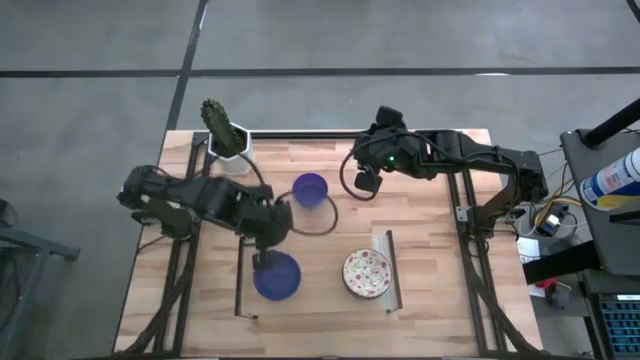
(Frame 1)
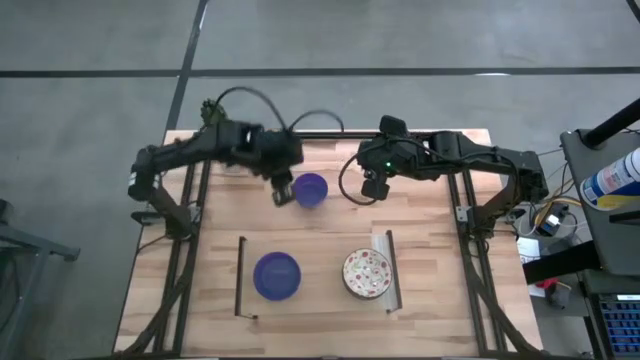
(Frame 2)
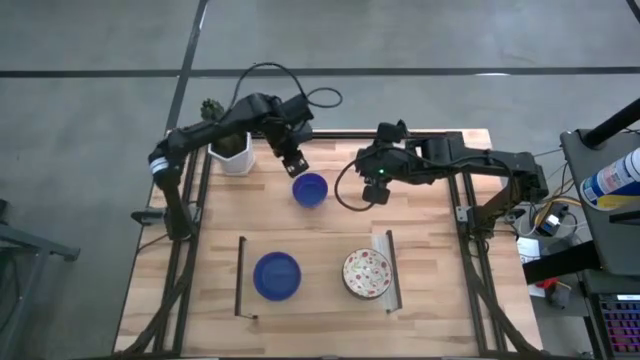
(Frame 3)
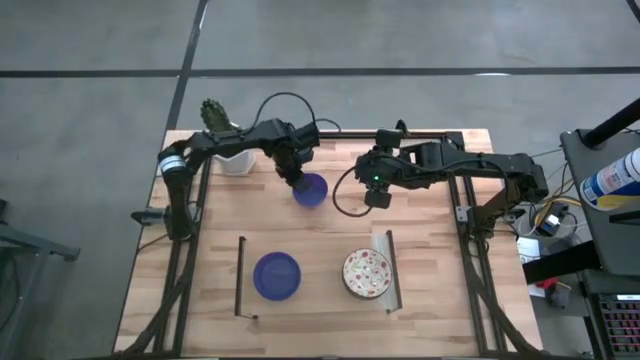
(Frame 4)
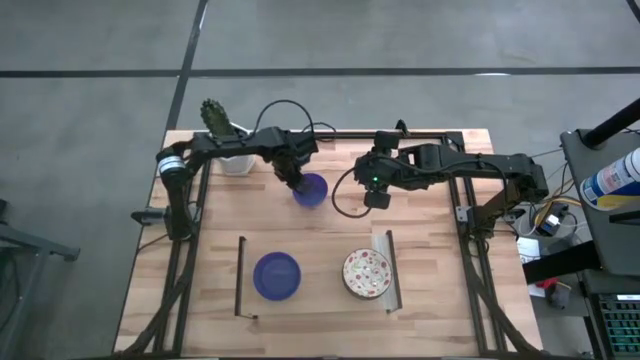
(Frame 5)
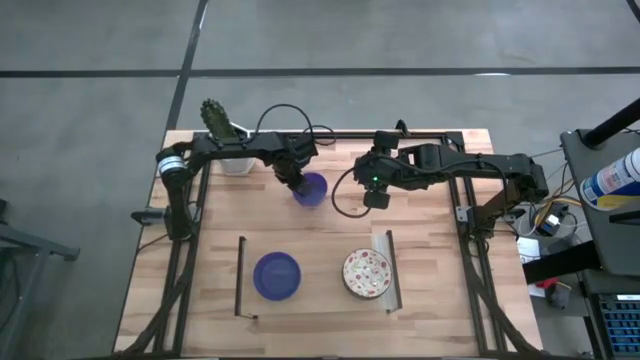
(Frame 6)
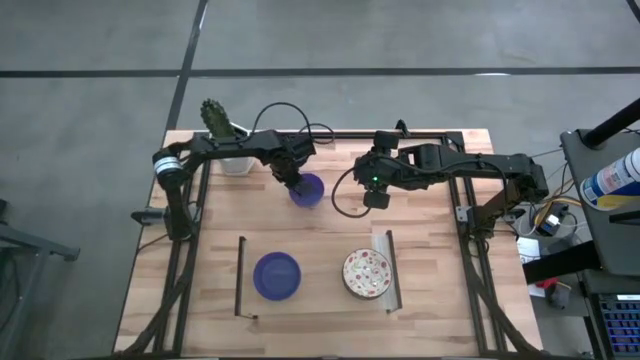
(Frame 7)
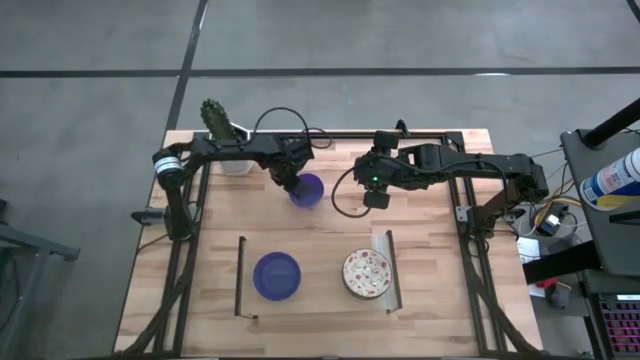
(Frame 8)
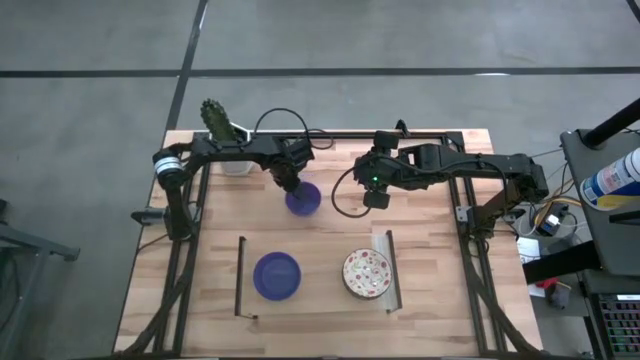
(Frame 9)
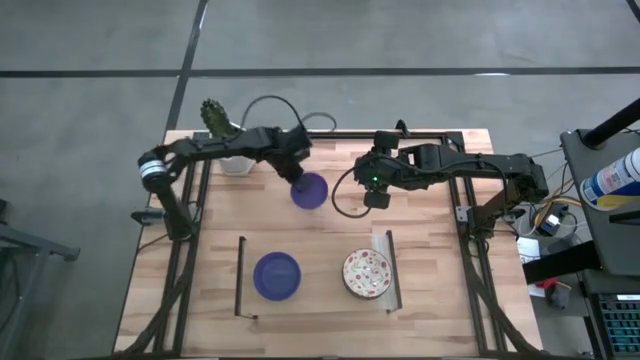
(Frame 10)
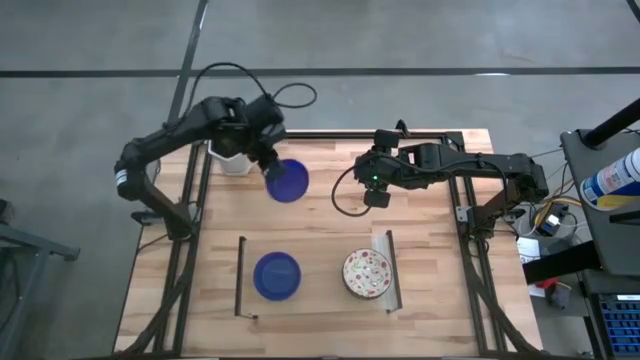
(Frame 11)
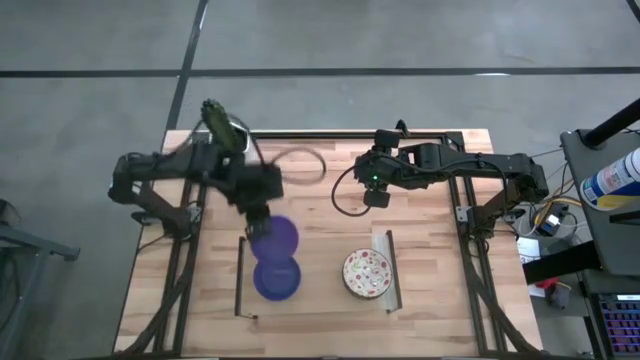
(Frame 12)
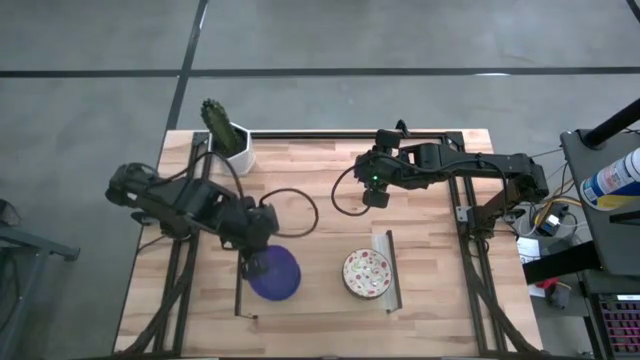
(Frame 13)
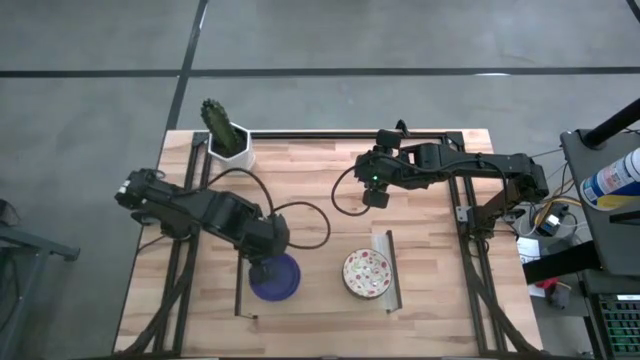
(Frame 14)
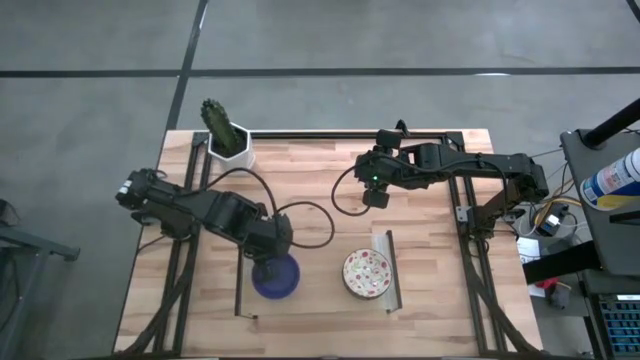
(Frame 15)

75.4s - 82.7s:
Task: Pick & Place Mini bowls
Stack the blue bowl on the blue bowl on the shelf

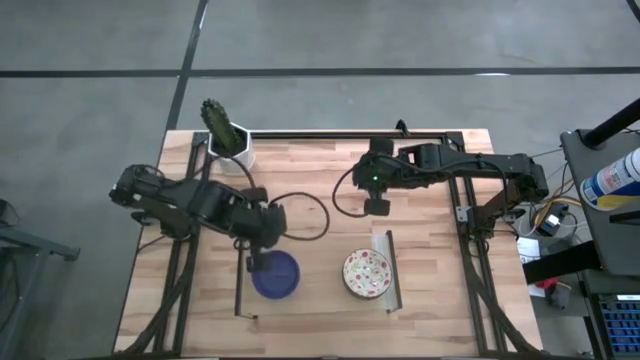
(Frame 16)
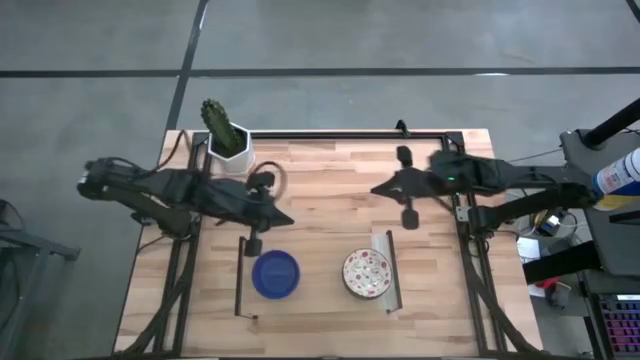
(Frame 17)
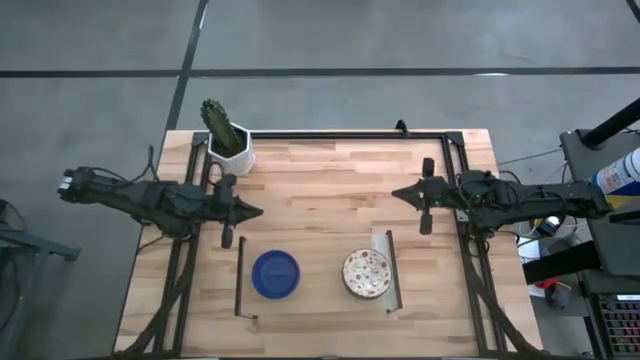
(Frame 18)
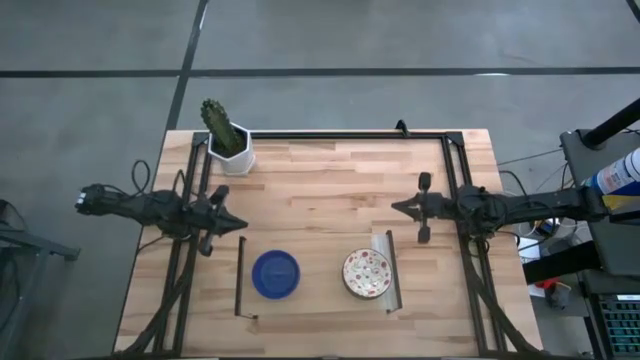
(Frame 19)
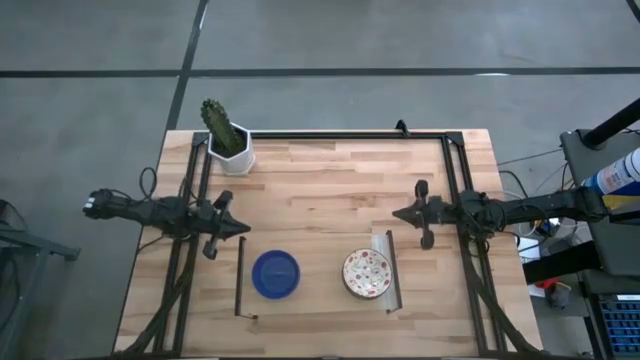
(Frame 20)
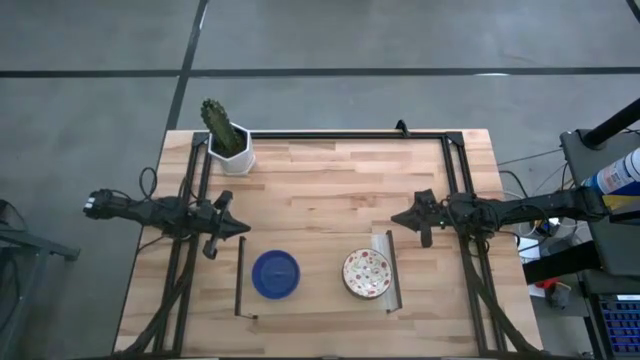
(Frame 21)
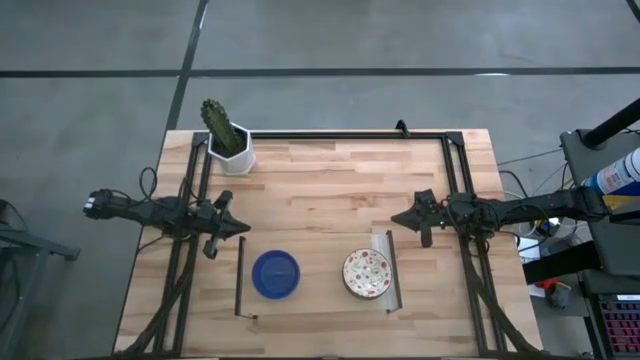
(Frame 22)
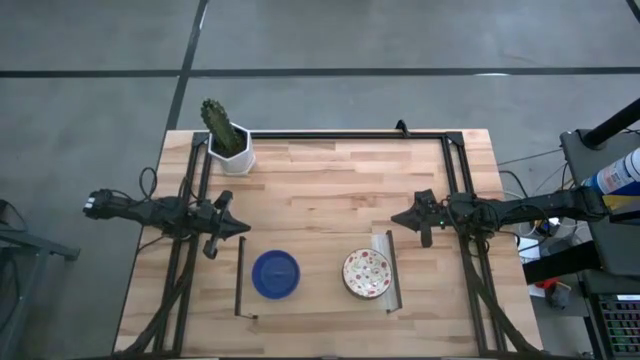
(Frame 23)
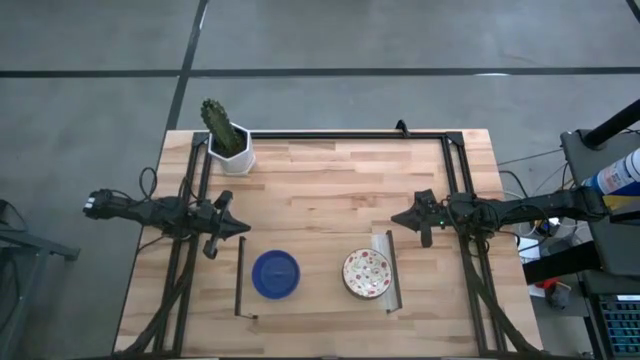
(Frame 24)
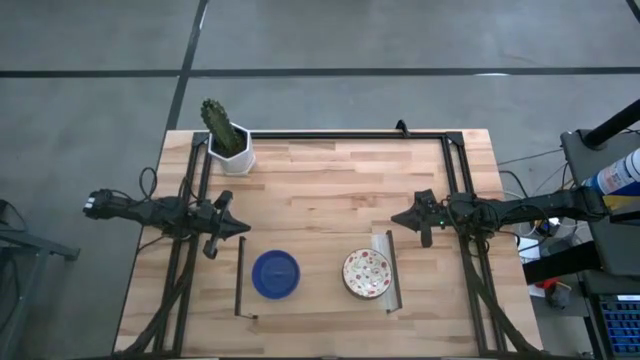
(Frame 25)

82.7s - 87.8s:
Return to Home Position

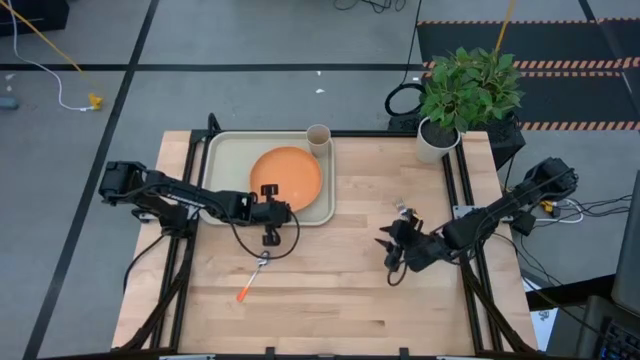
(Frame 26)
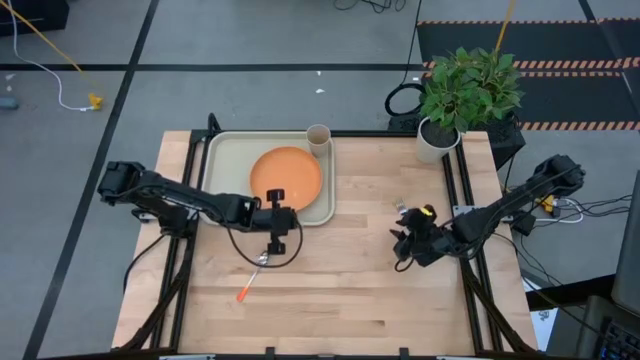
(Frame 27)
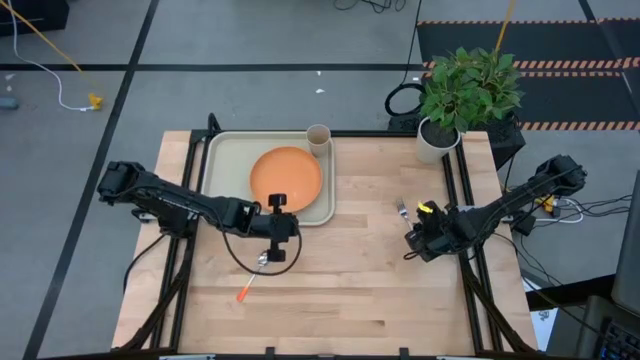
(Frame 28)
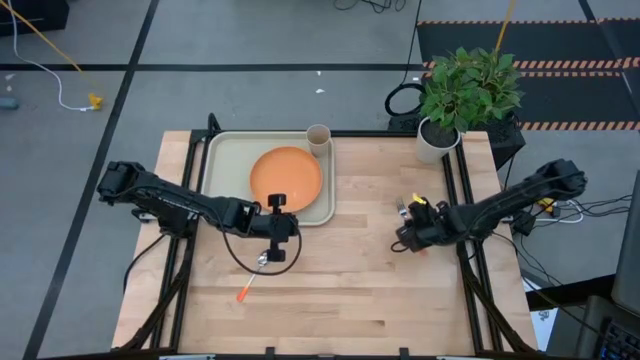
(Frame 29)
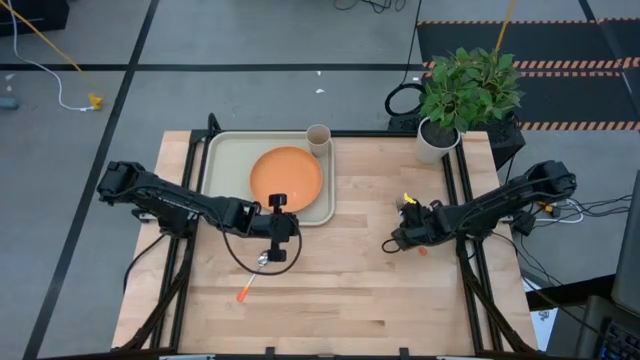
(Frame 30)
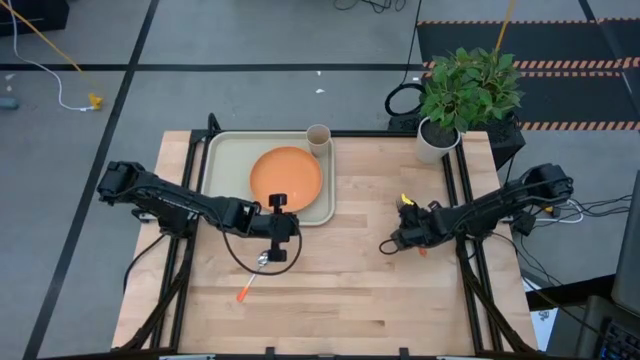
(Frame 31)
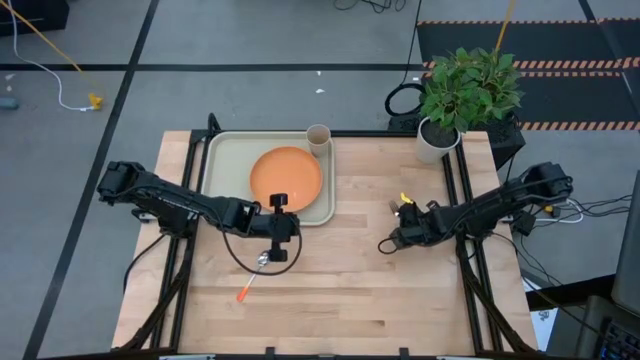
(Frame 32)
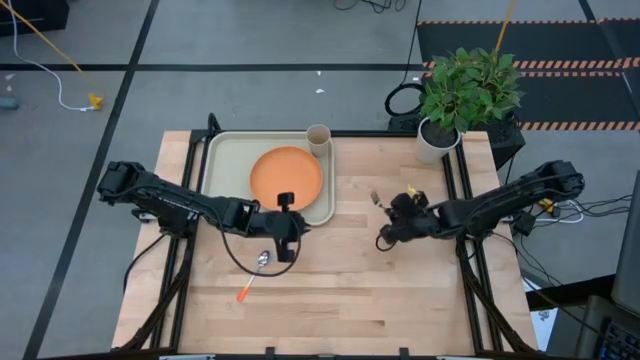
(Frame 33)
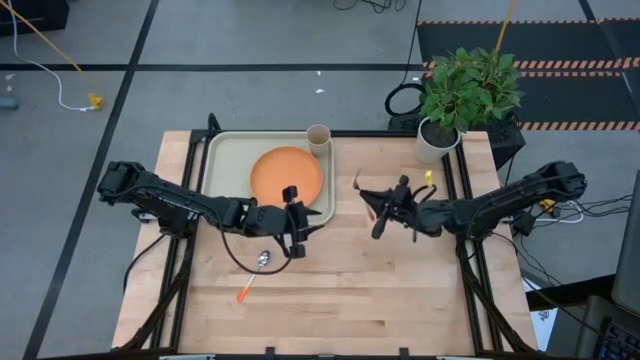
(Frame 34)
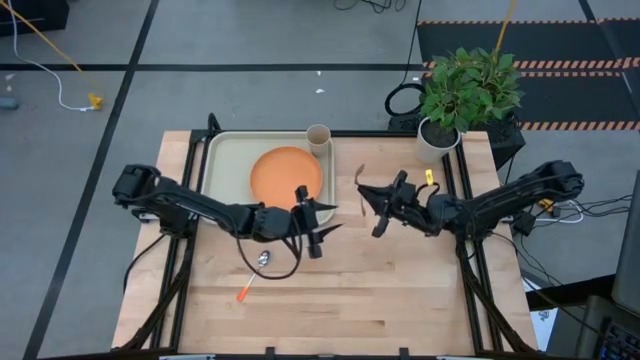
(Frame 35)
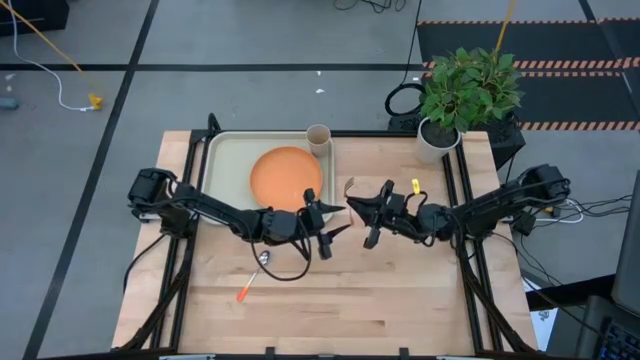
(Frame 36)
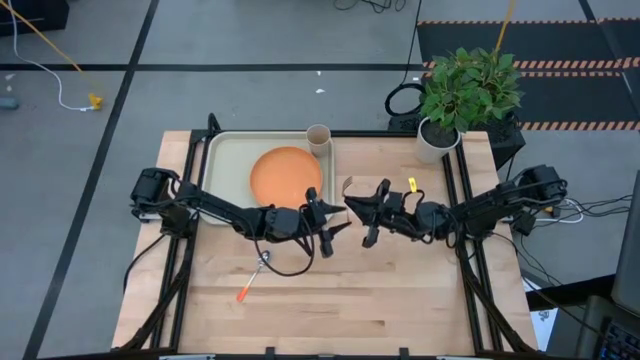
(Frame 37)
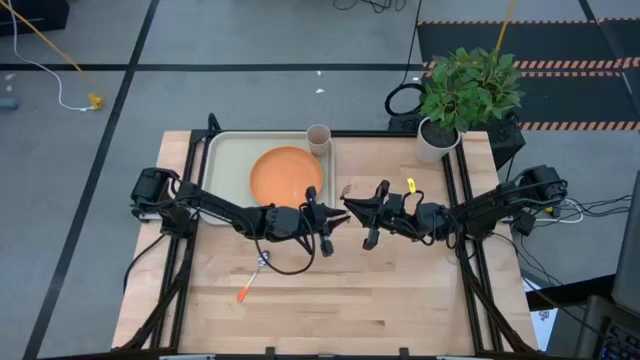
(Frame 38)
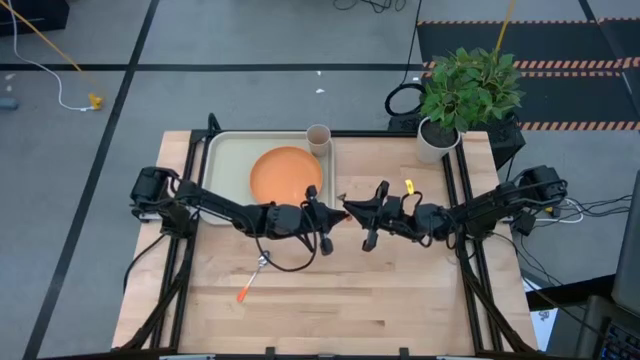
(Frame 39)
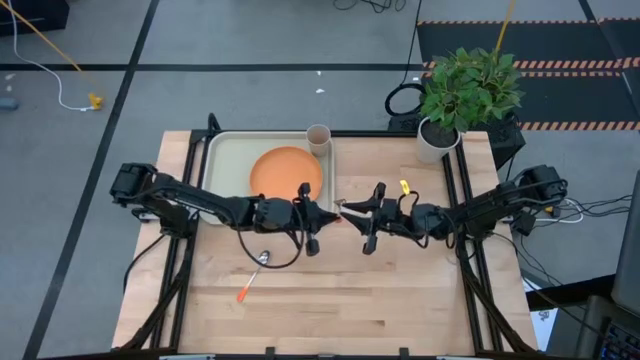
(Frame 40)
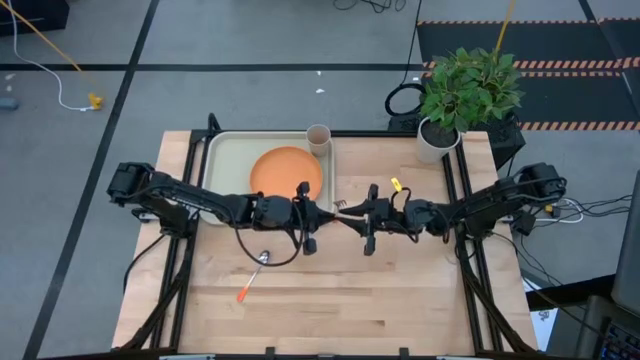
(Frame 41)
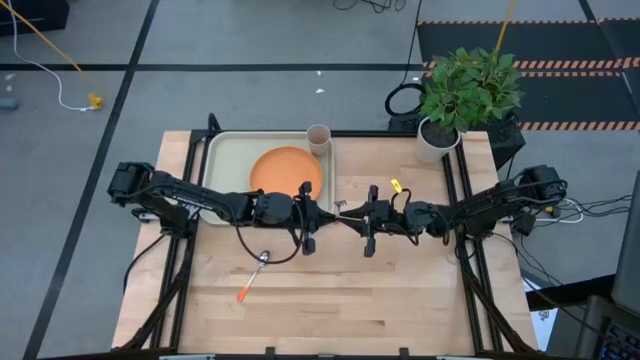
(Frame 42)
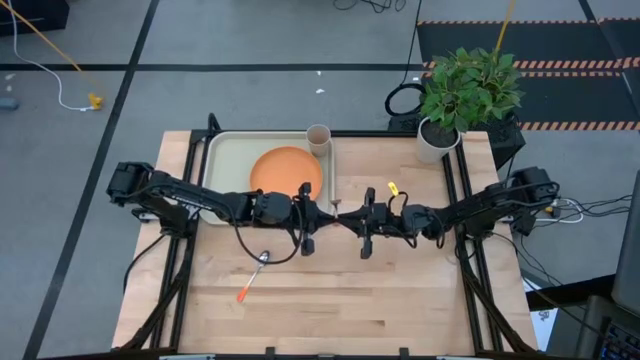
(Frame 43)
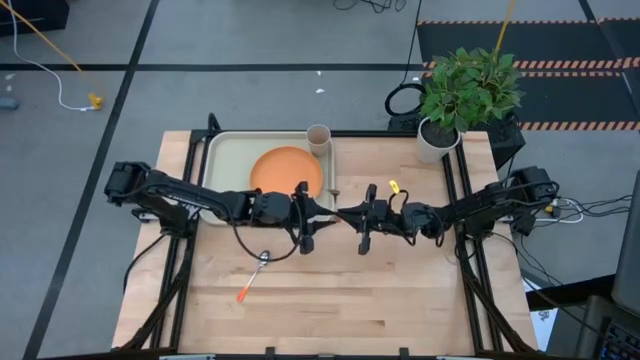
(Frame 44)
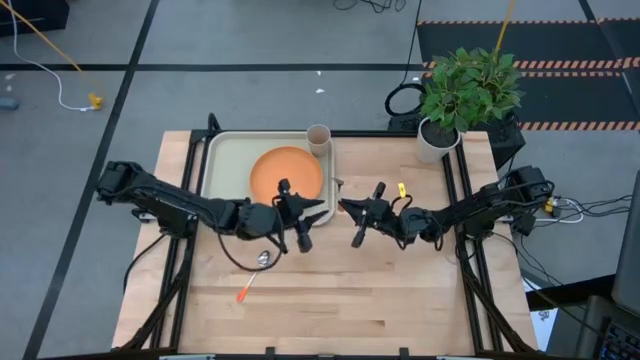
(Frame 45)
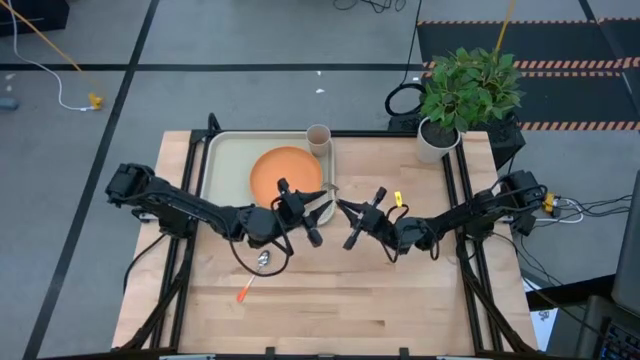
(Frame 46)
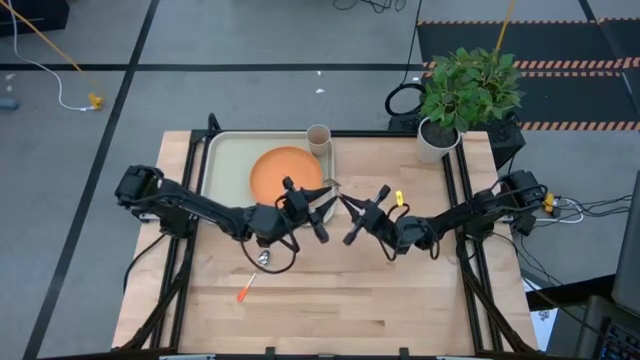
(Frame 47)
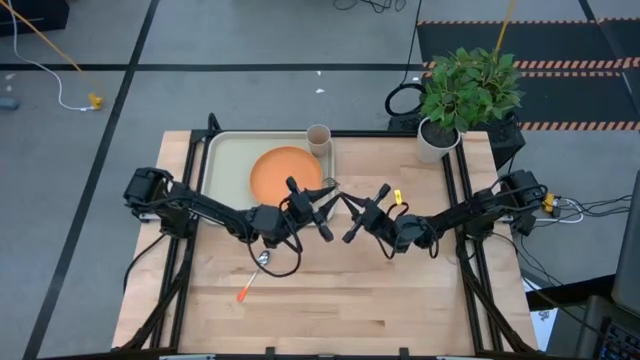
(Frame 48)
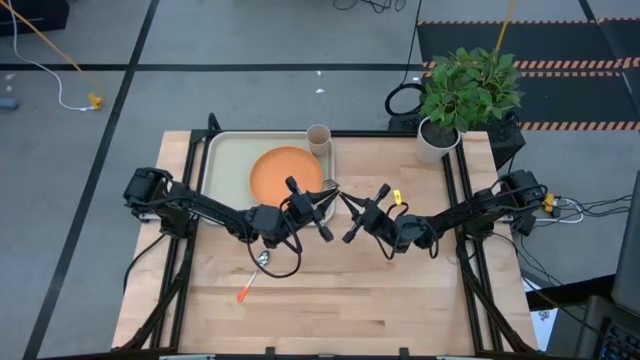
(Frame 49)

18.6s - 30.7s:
Task: Pick and place plate/cup/fork/spoon on tray
Put the orange fork on the white serving tray to the left of the orange plate
